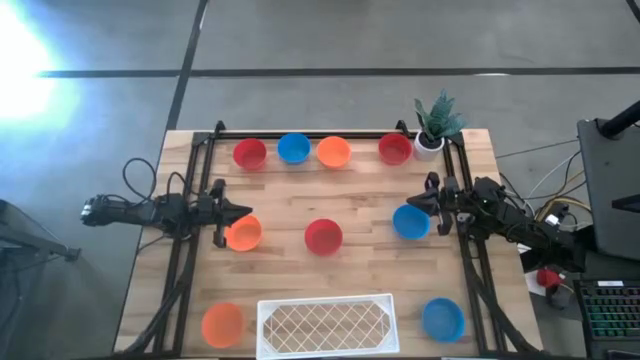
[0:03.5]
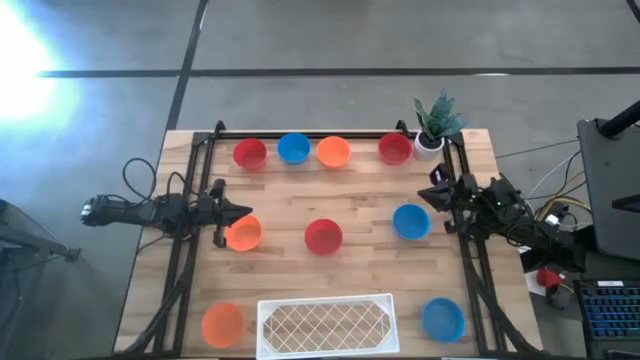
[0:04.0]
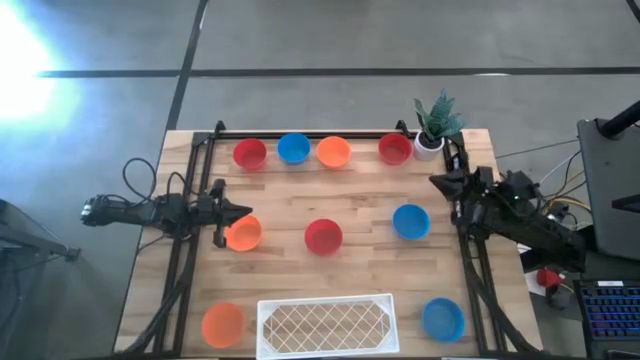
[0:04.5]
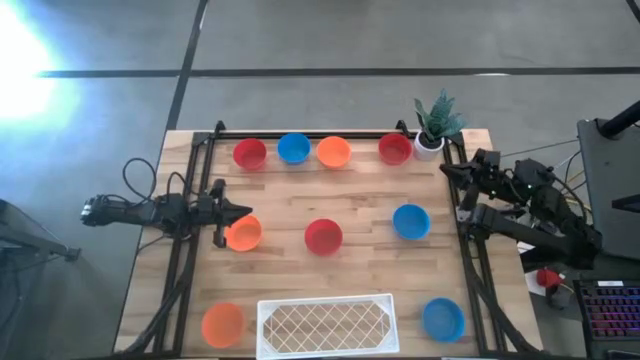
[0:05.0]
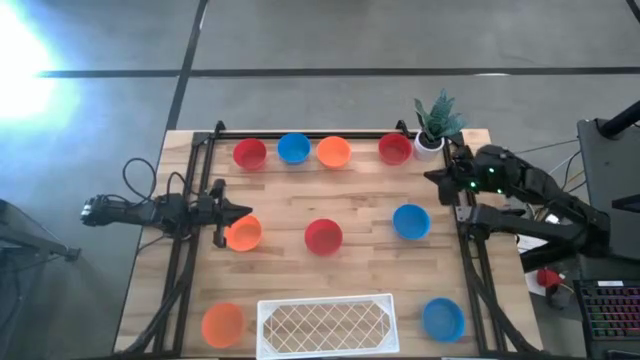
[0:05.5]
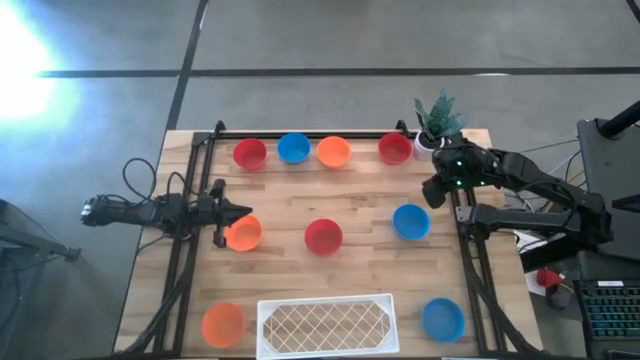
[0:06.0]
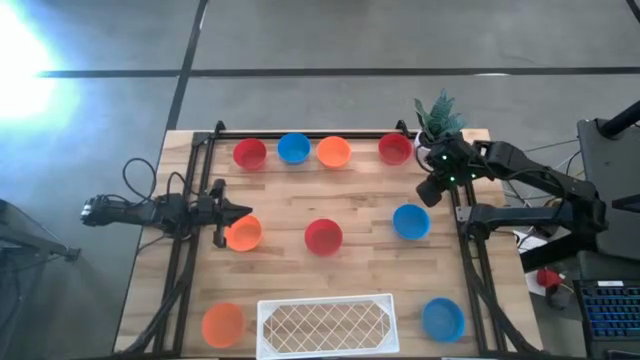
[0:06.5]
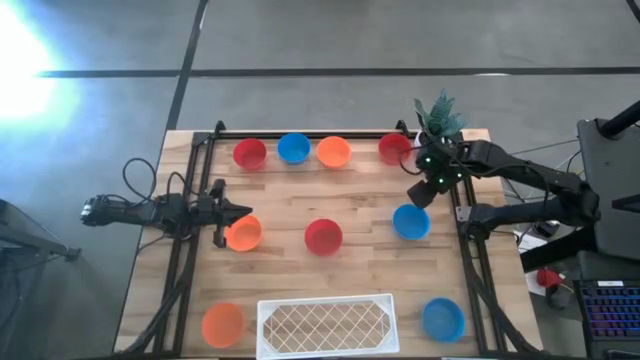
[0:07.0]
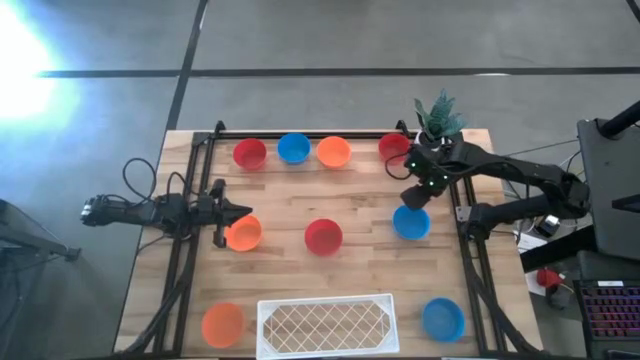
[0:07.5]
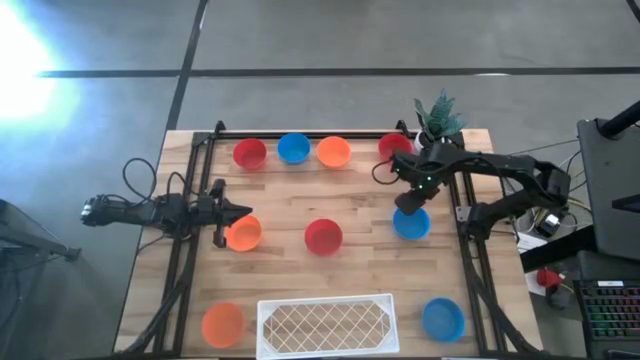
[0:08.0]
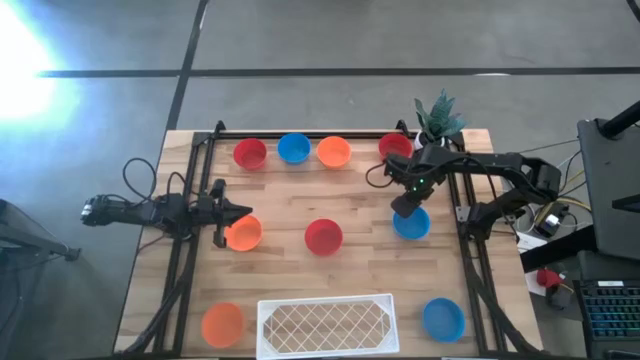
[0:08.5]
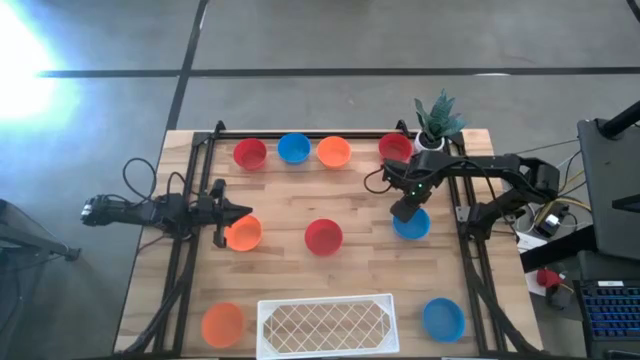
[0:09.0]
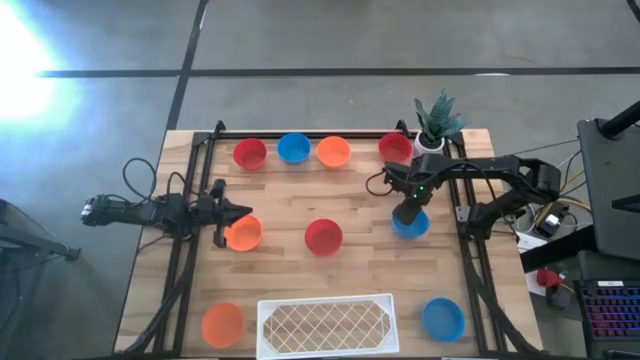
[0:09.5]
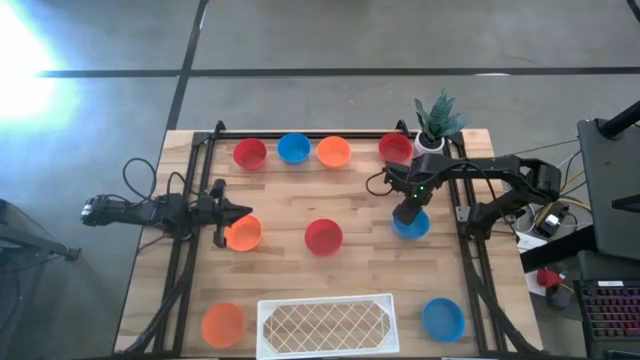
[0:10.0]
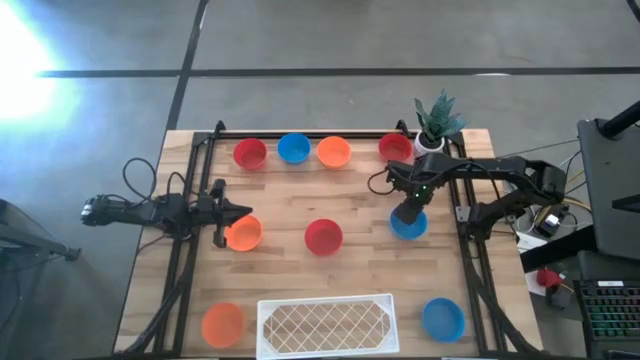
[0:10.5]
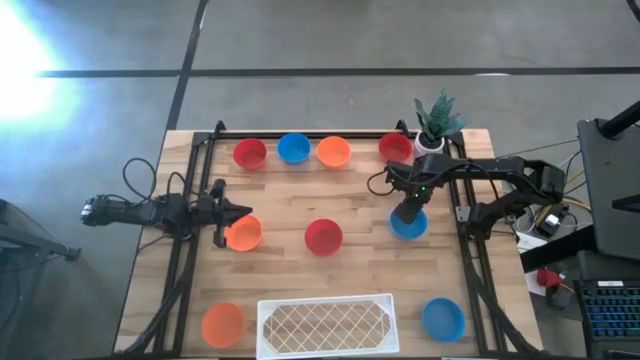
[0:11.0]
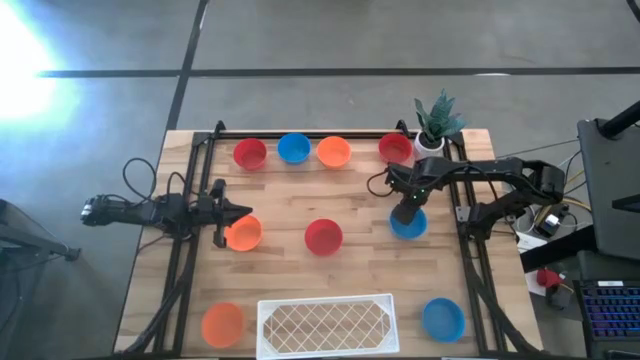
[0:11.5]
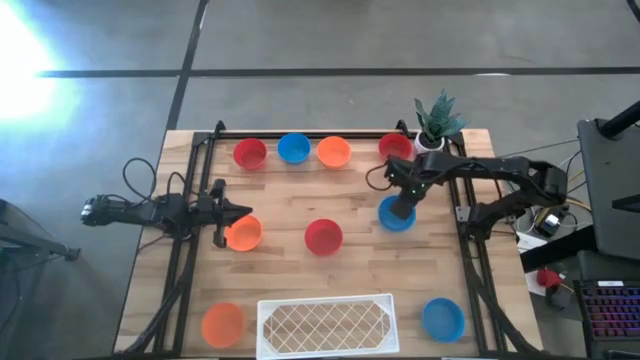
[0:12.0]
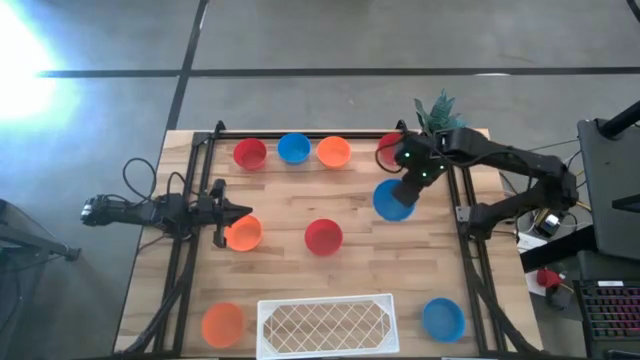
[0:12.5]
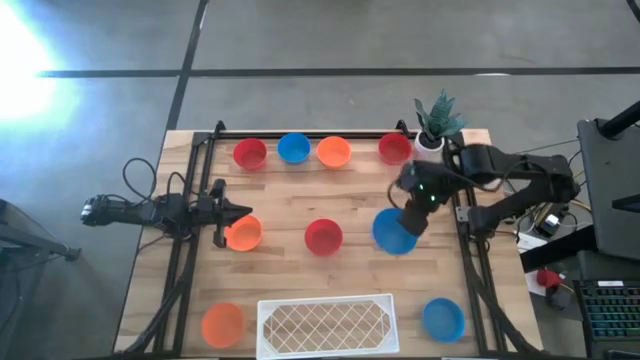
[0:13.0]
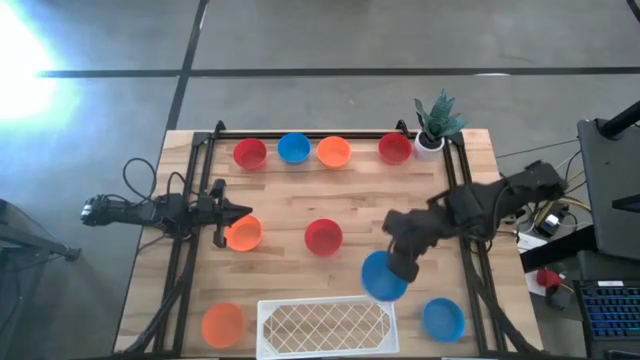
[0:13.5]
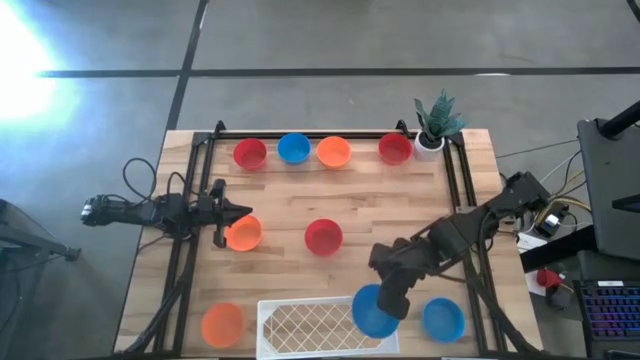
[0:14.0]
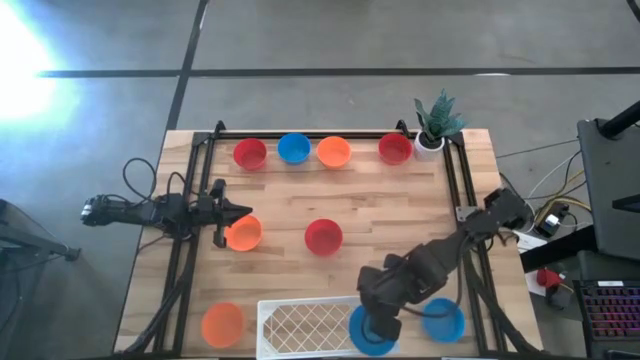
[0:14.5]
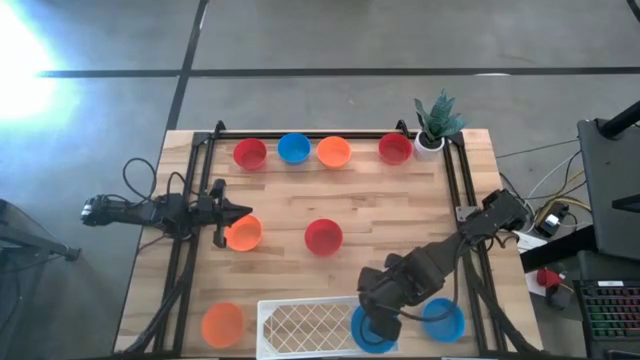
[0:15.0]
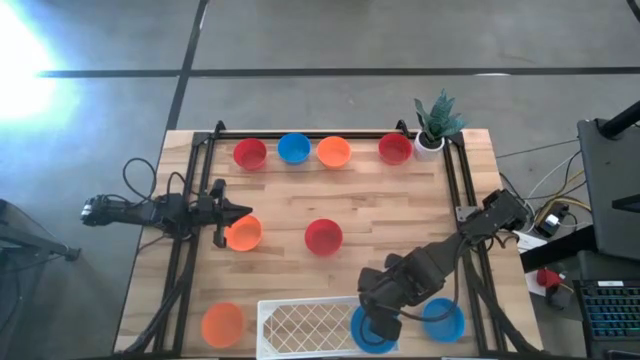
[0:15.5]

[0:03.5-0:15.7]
Task: Pick & Place Mini bowls
Put the middle blue bowl on the shelf

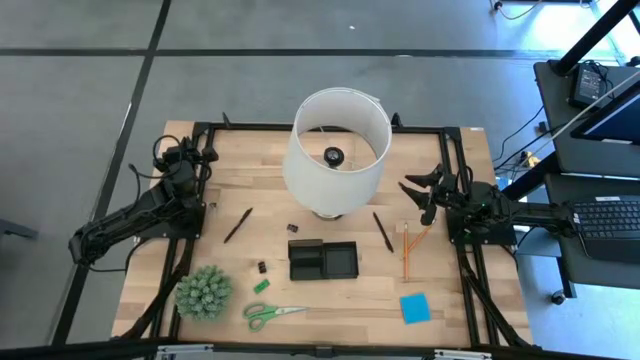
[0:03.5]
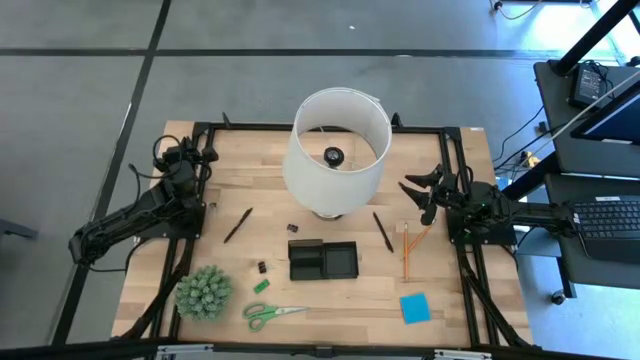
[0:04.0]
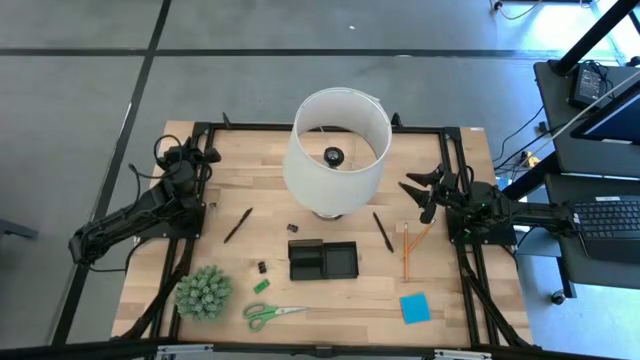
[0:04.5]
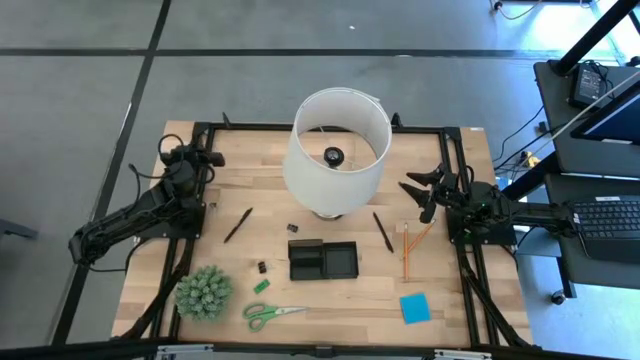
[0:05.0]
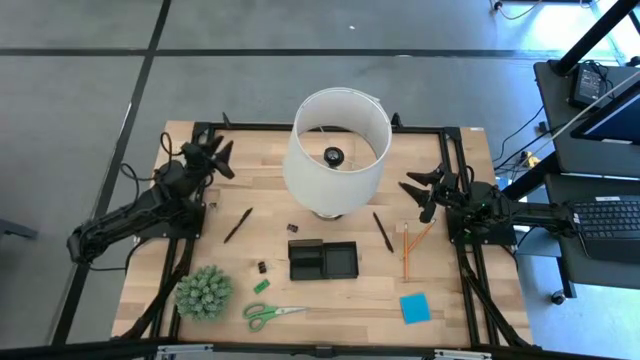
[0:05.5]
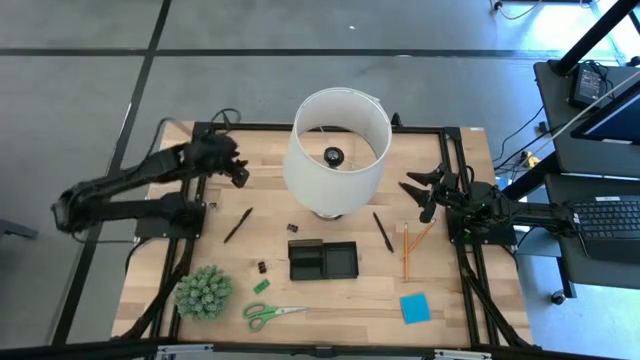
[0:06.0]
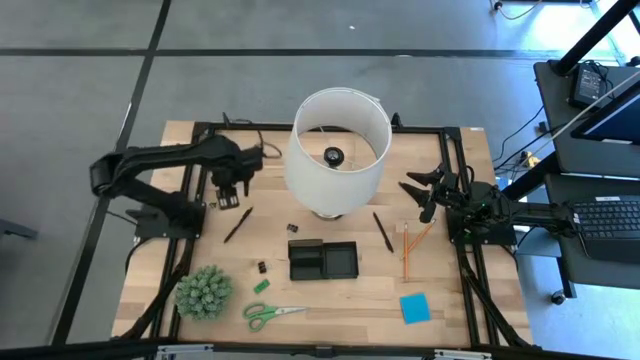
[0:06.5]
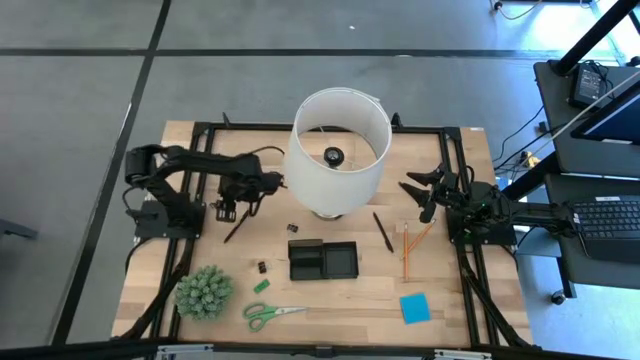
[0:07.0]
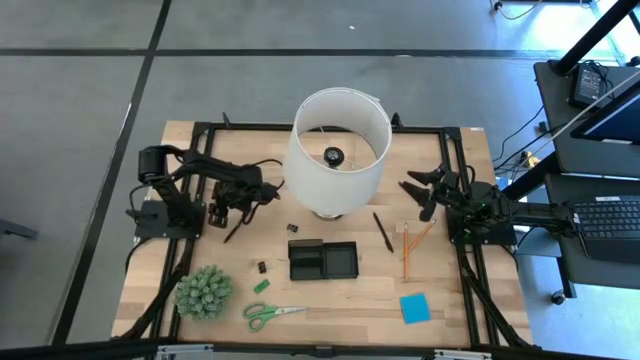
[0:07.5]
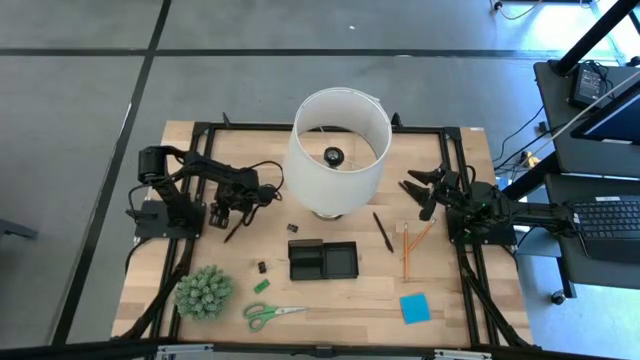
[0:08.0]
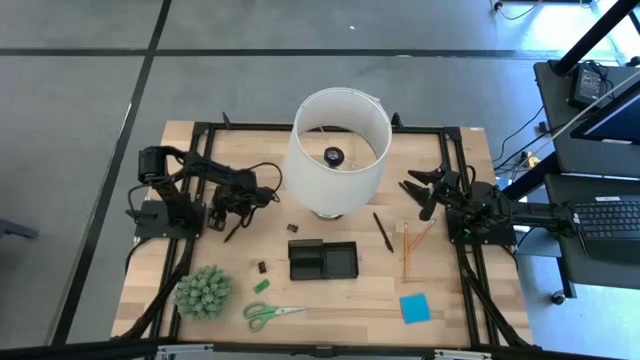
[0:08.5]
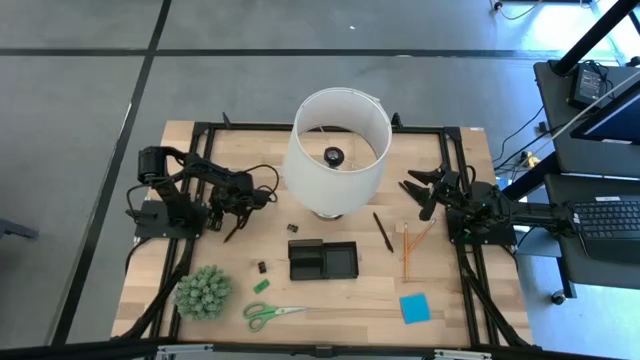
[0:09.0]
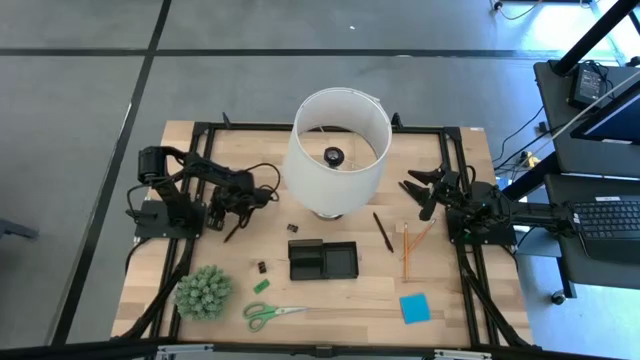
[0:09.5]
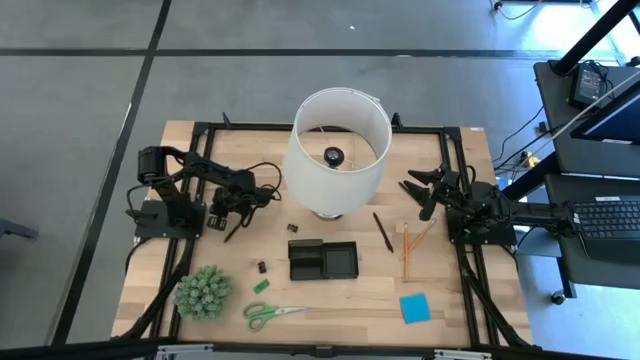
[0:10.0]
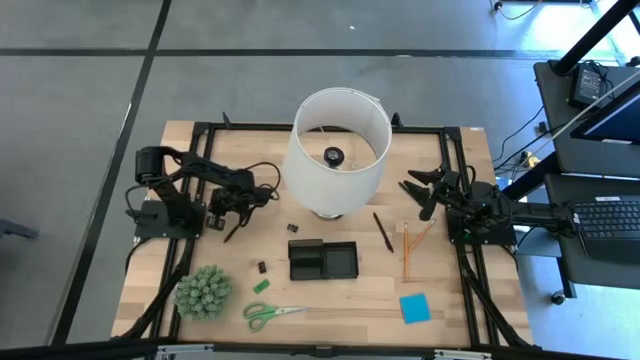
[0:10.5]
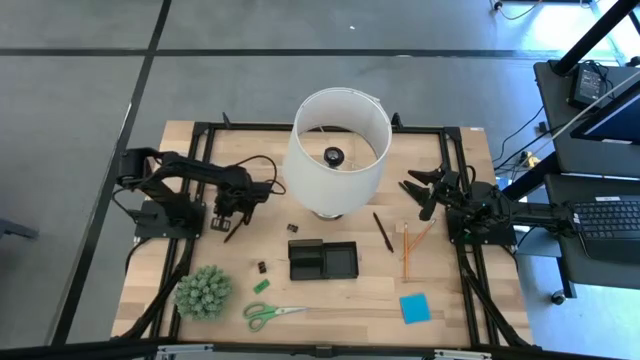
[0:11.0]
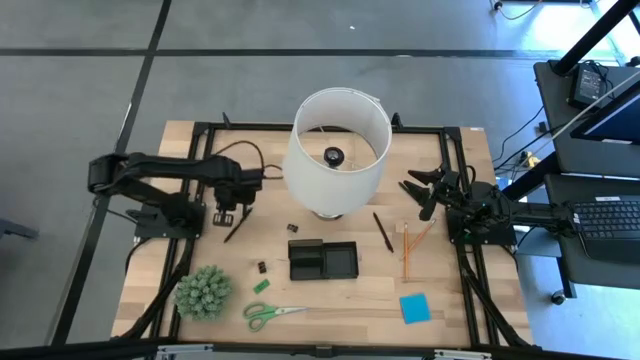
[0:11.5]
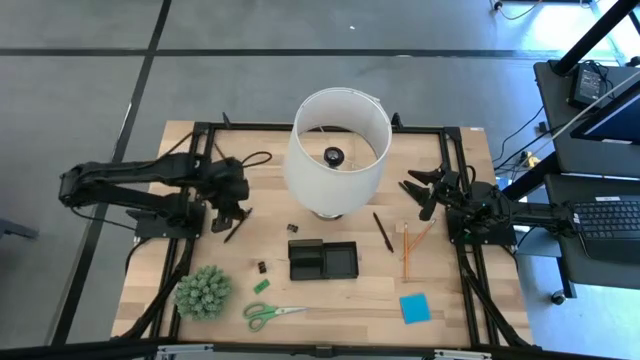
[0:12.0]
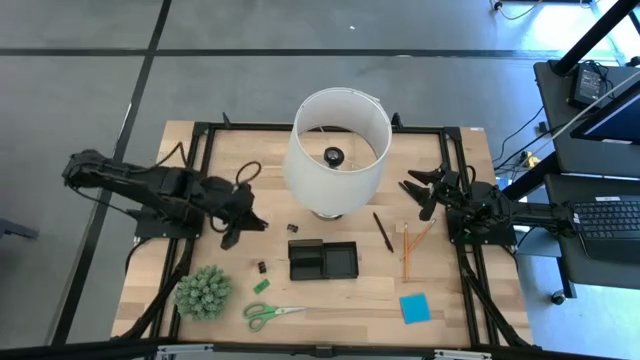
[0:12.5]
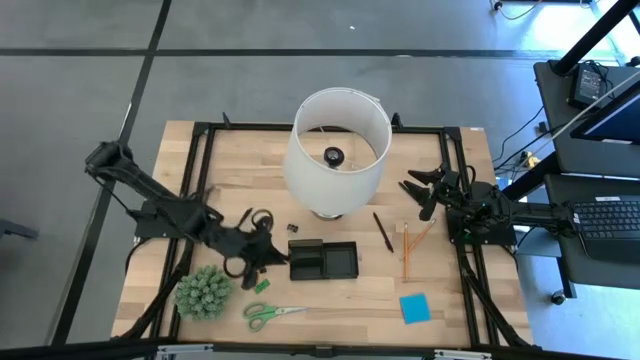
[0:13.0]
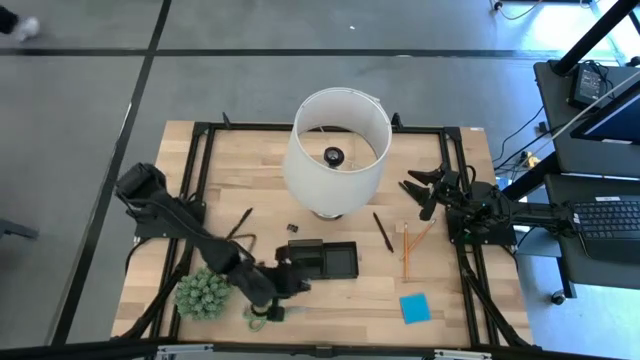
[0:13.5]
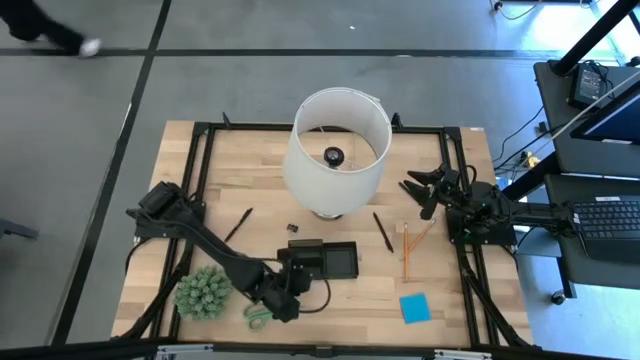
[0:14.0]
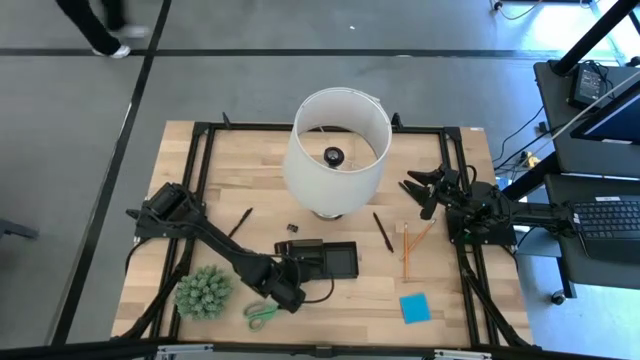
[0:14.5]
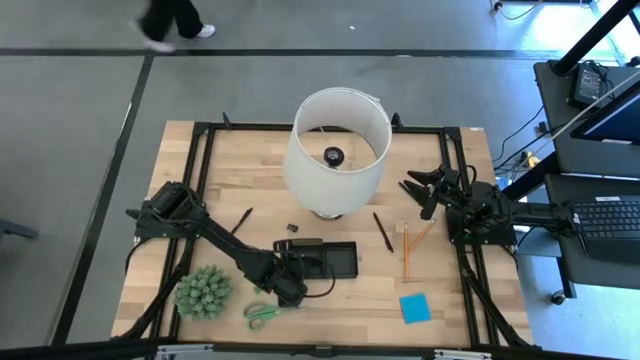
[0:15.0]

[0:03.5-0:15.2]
Task: Pick and place office supplies into organizer
Put the top black binder clip into the black desk organizer
